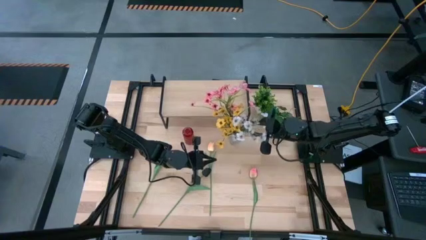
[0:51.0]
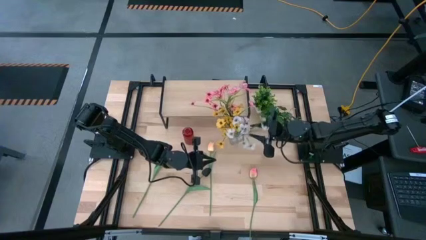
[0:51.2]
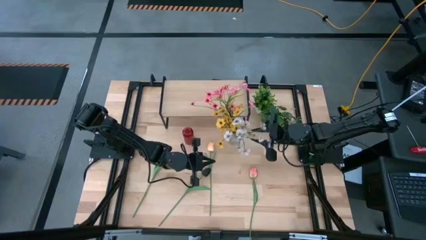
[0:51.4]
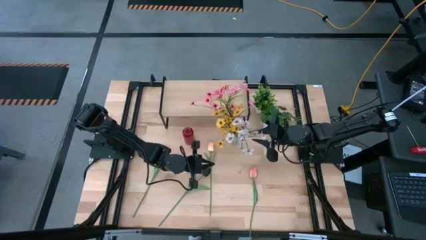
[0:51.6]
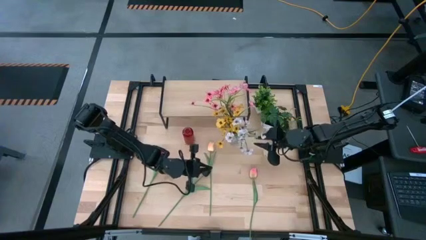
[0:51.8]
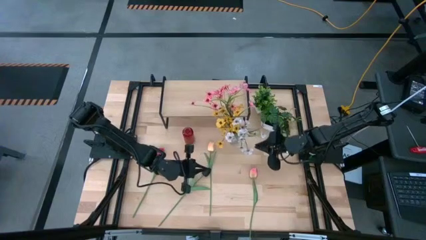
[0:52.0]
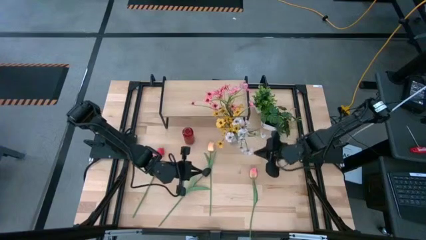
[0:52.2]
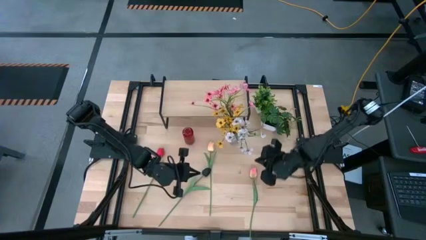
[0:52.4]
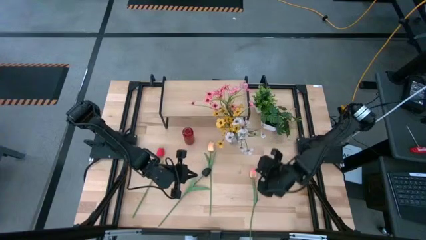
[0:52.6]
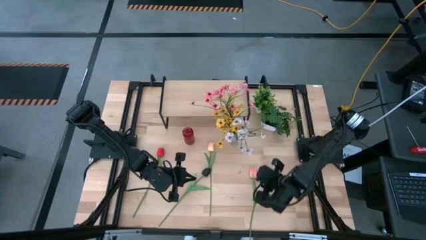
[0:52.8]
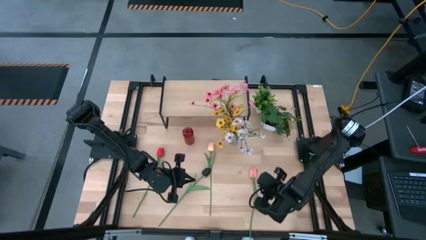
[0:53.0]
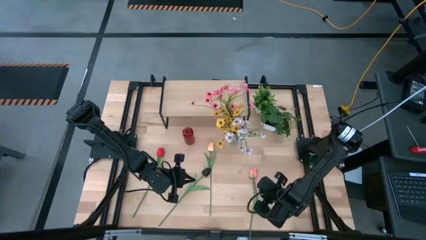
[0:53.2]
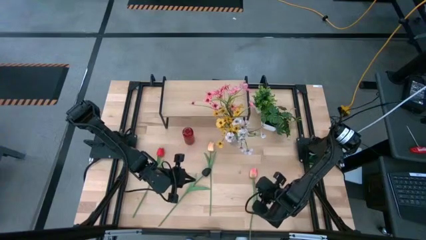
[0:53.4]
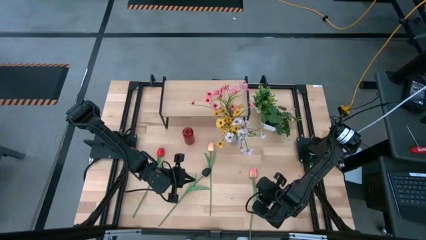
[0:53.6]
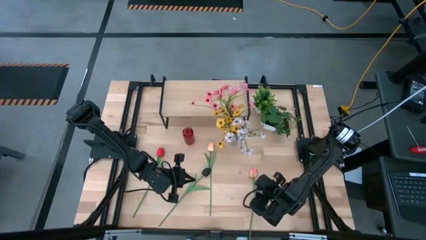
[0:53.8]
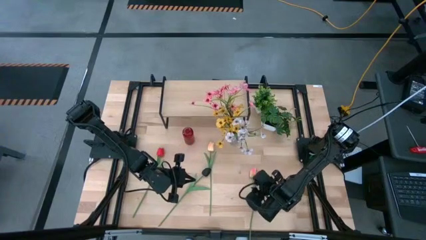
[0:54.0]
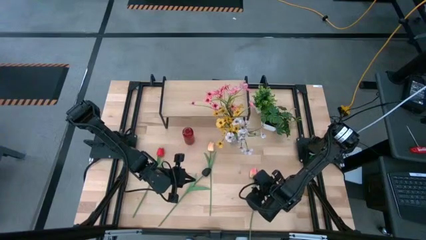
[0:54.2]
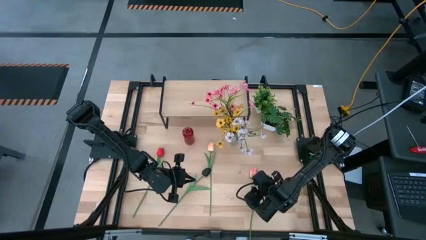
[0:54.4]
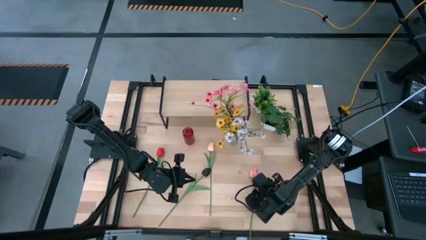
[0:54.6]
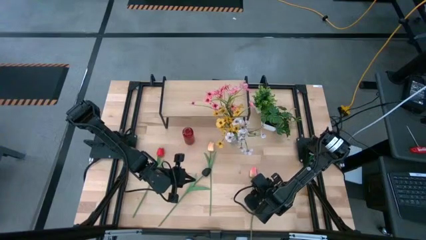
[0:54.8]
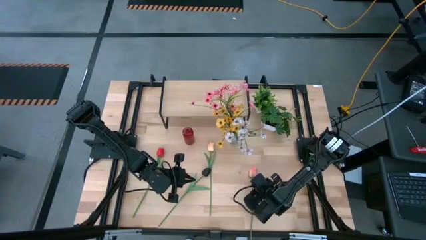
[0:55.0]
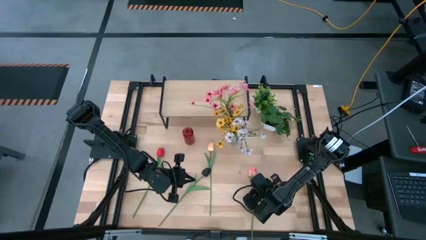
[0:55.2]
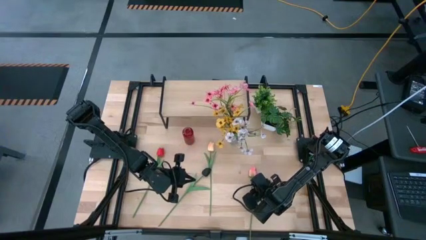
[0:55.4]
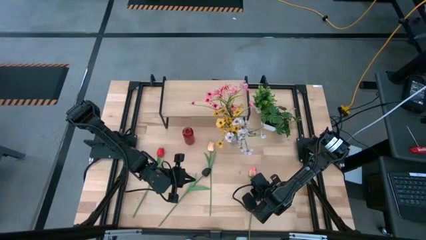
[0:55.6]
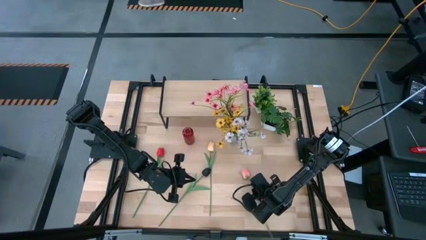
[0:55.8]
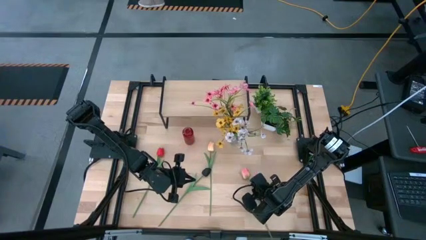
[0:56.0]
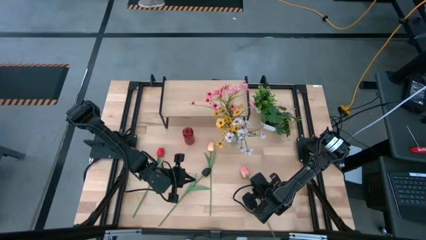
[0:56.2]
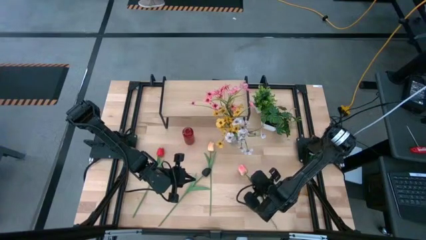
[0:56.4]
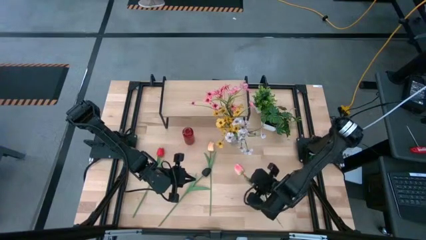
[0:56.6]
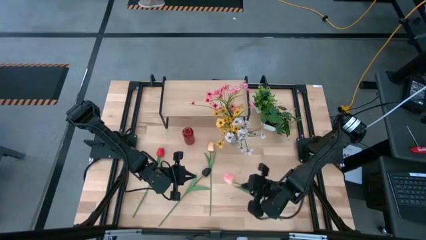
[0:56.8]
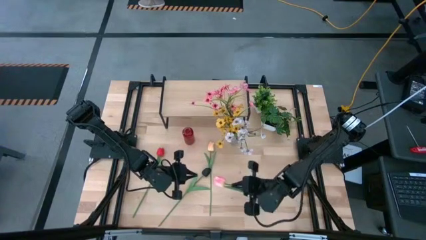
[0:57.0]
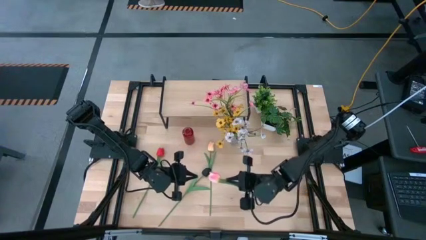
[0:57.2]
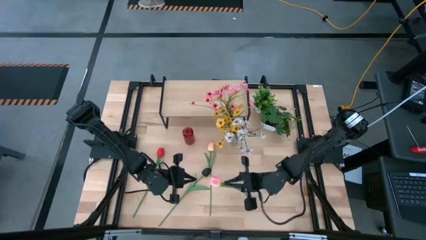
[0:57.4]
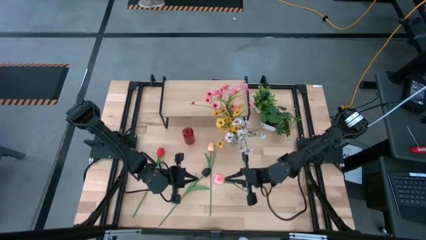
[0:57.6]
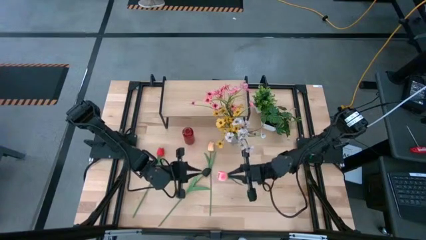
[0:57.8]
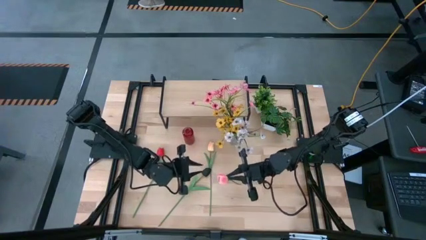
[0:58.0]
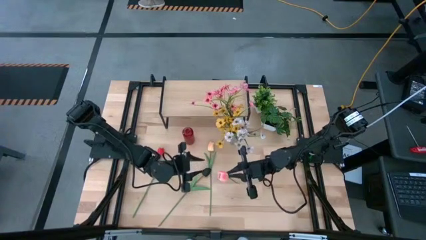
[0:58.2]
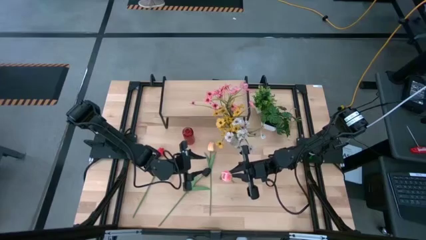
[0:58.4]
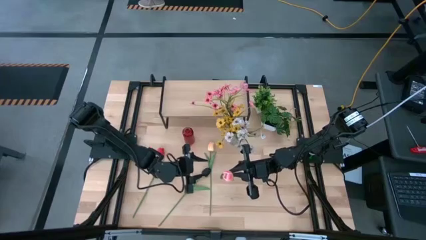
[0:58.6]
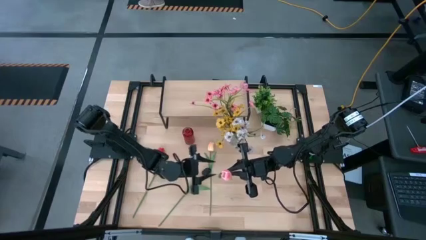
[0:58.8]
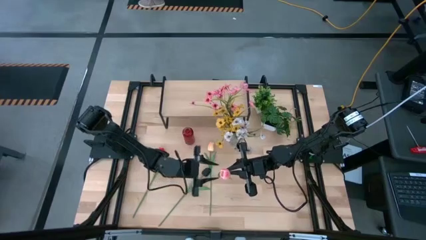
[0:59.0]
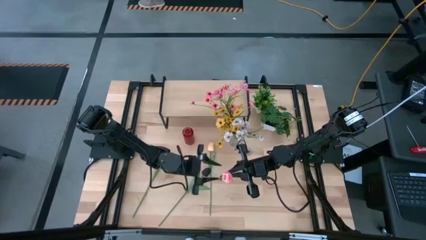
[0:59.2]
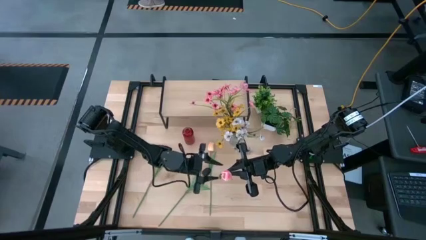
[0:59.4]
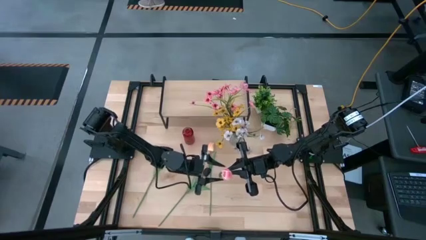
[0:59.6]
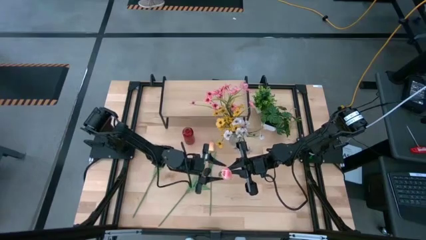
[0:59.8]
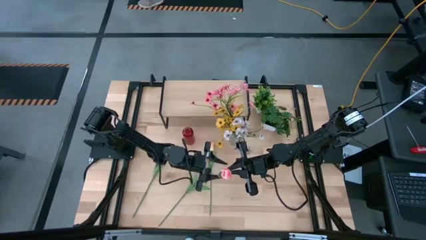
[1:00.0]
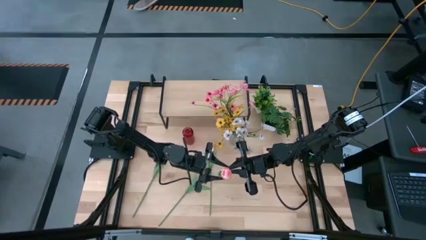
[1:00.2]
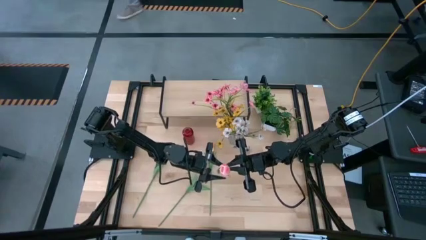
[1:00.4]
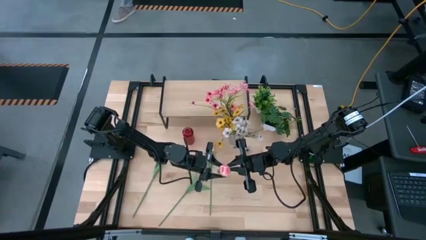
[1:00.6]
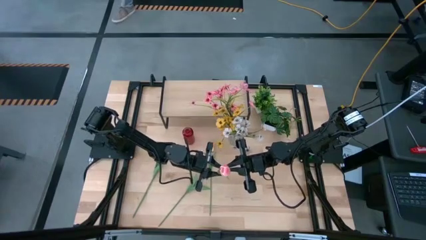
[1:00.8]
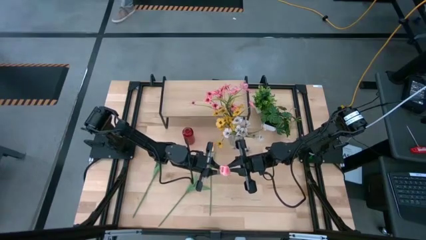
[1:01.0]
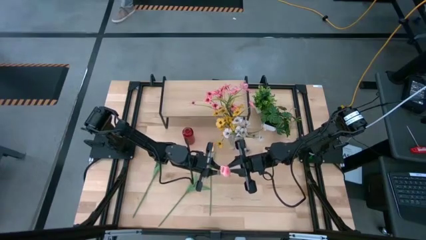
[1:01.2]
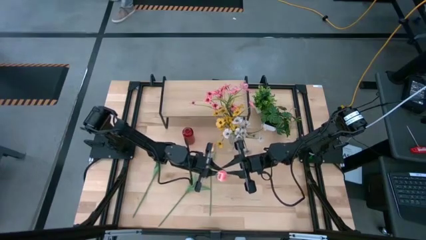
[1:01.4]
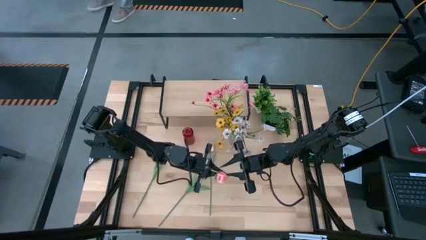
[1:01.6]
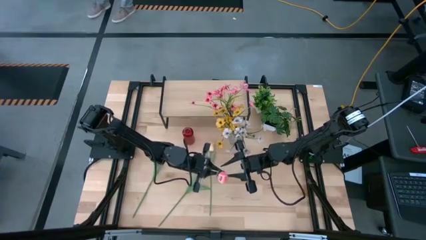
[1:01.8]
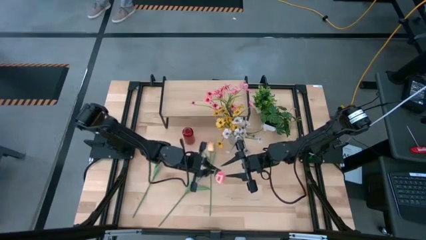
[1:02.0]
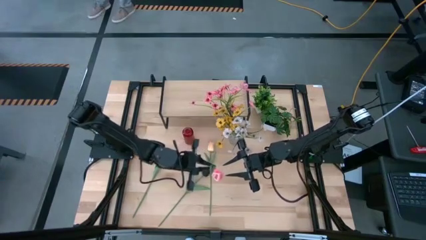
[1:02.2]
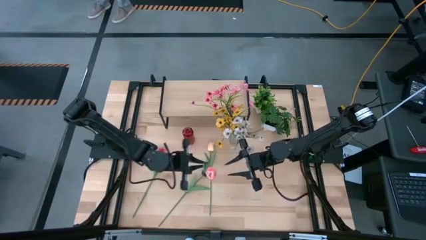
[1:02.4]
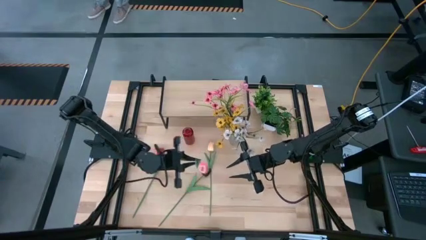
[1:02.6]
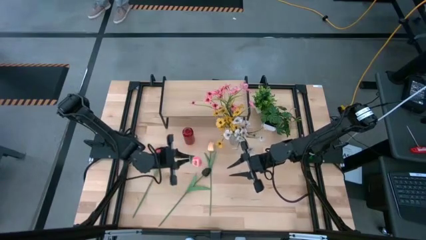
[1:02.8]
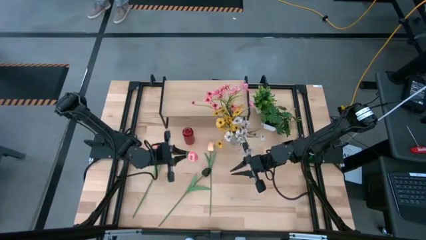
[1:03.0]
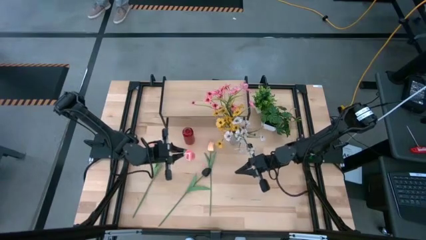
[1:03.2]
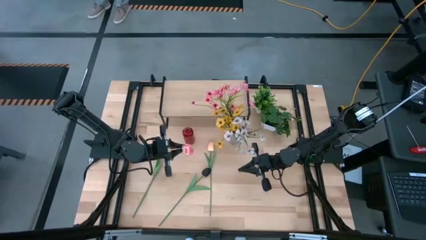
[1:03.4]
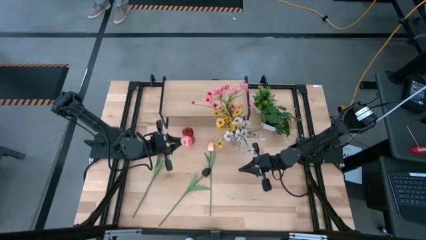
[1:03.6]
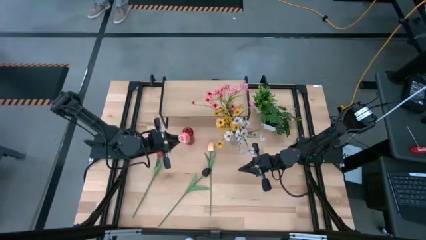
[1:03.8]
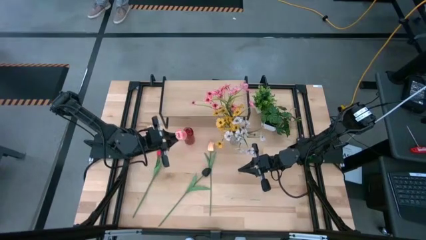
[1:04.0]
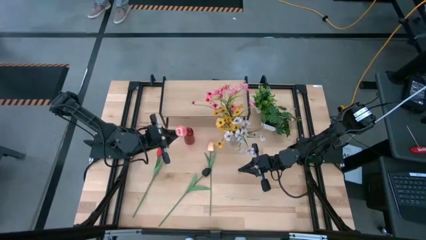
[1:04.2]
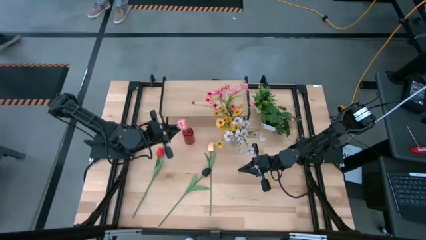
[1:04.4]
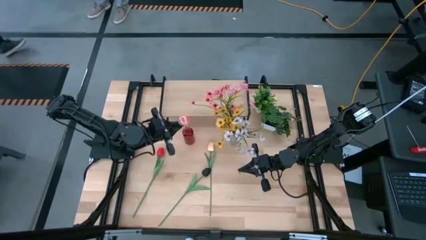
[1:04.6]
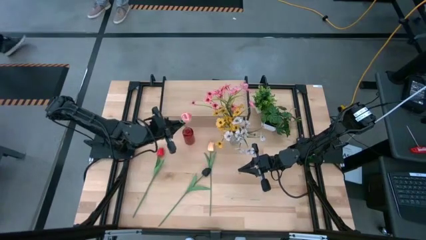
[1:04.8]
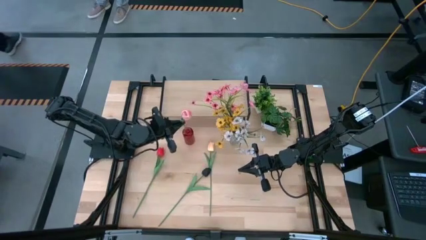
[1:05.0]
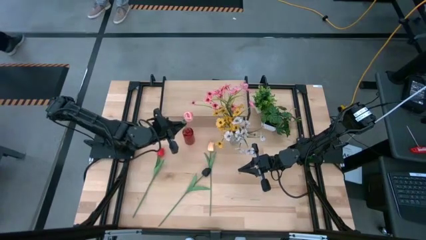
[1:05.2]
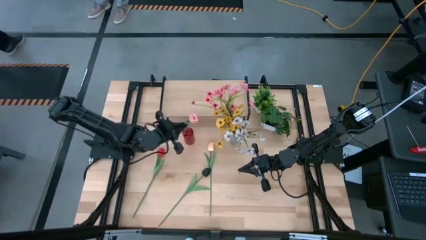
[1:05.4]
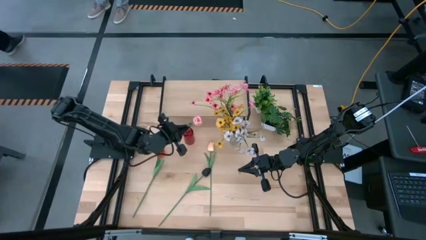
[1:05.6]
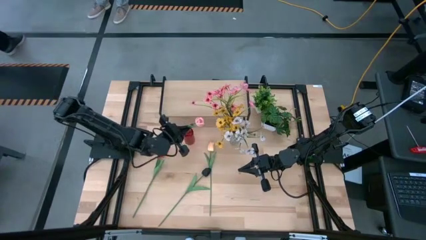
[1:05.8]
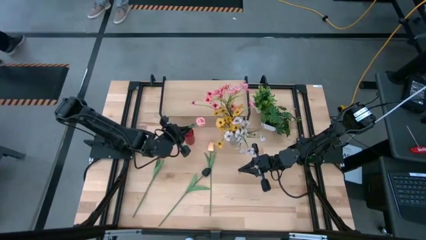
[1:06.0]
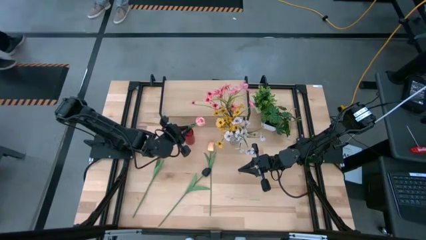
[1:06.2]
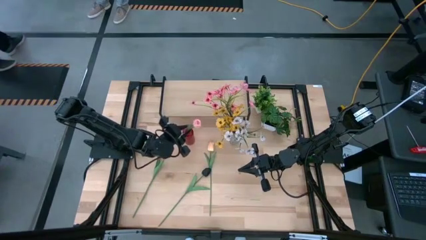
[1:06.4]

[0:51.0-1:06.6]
Task: Pick and place flowers into a vace then onto a shelf
Put the pink flower into the red flower vase
